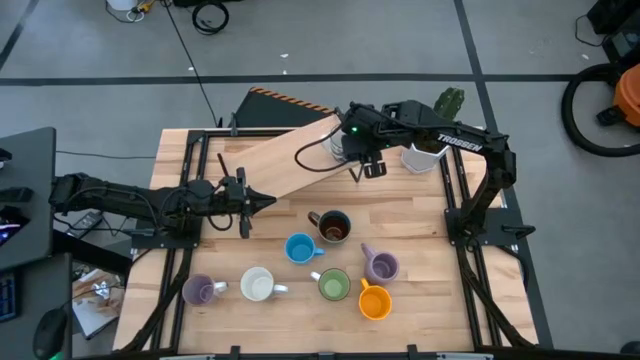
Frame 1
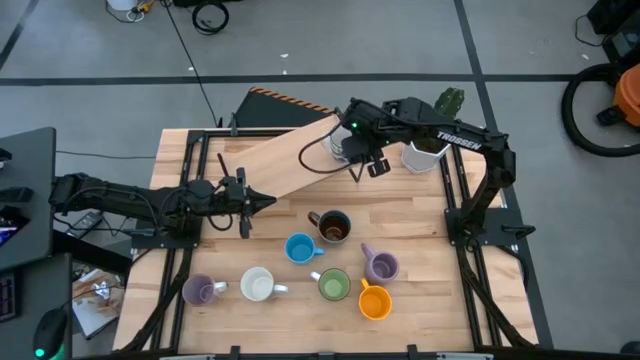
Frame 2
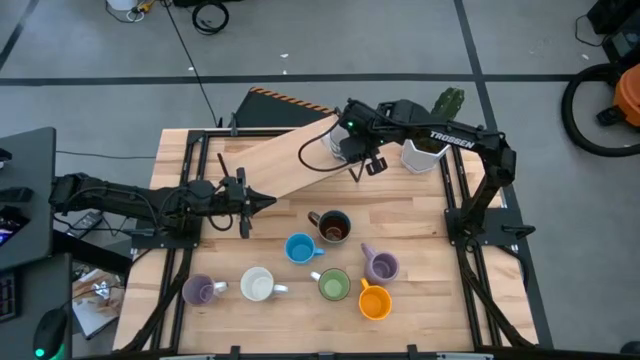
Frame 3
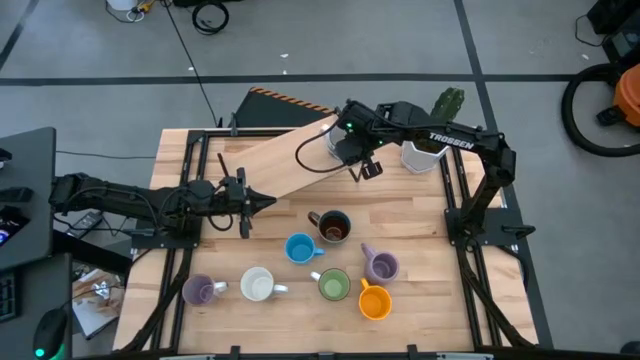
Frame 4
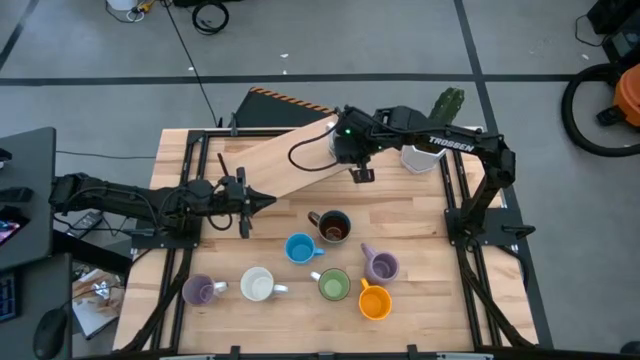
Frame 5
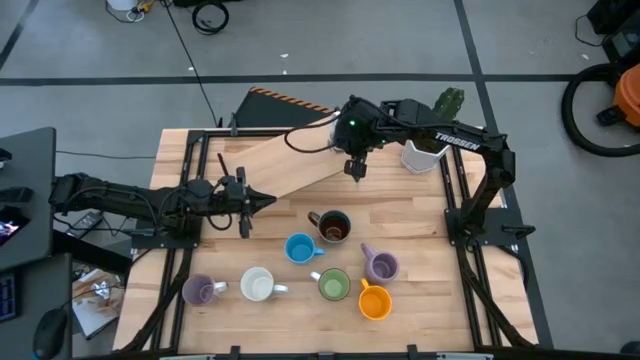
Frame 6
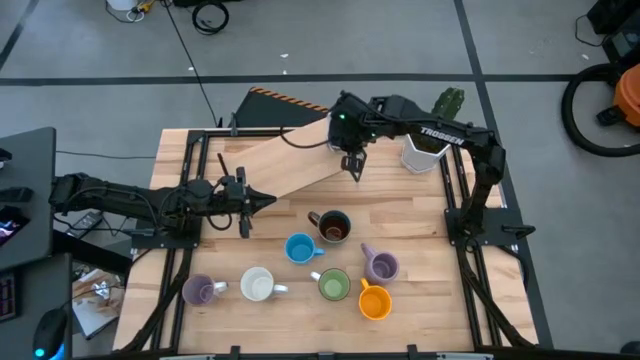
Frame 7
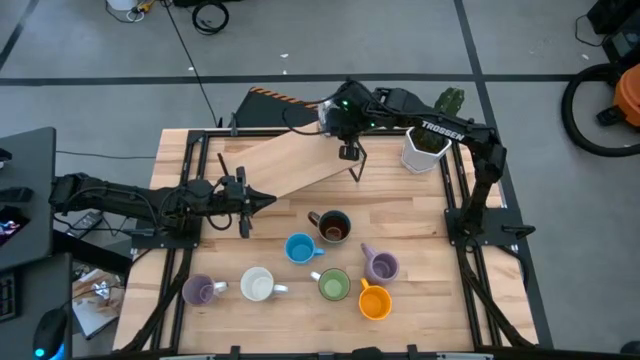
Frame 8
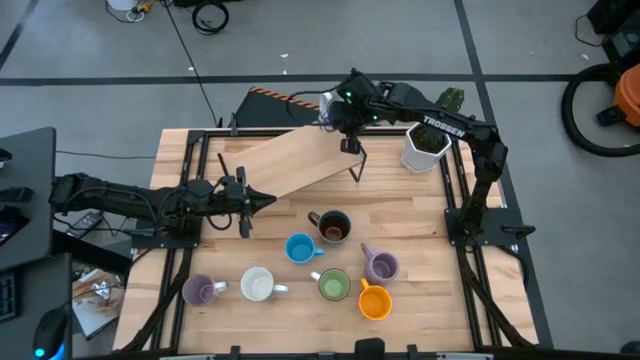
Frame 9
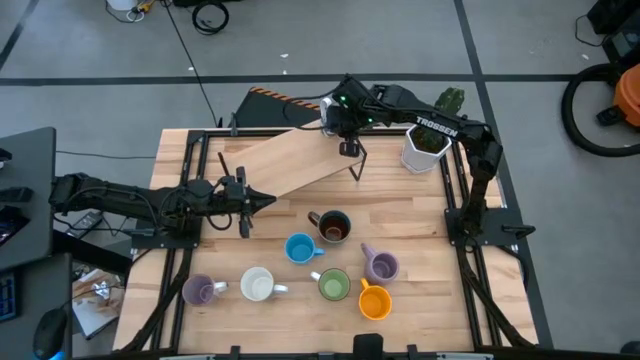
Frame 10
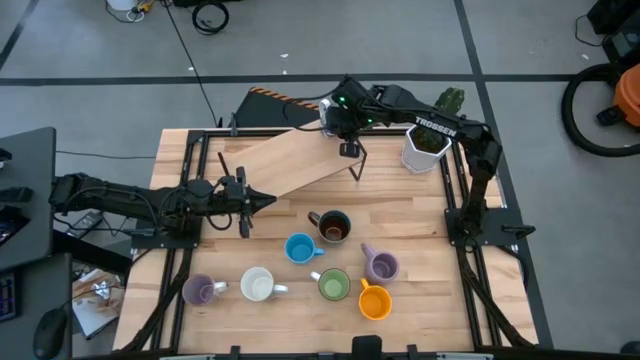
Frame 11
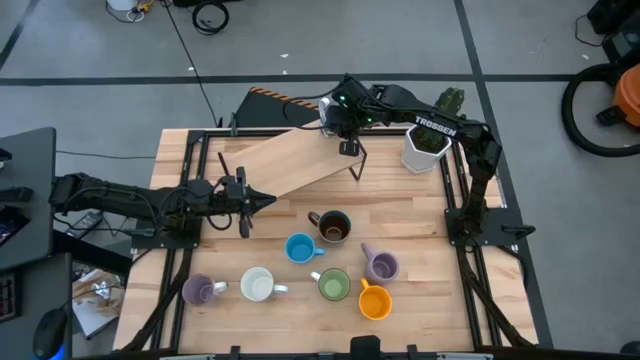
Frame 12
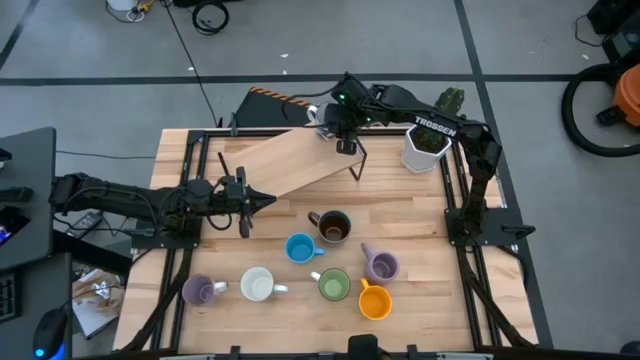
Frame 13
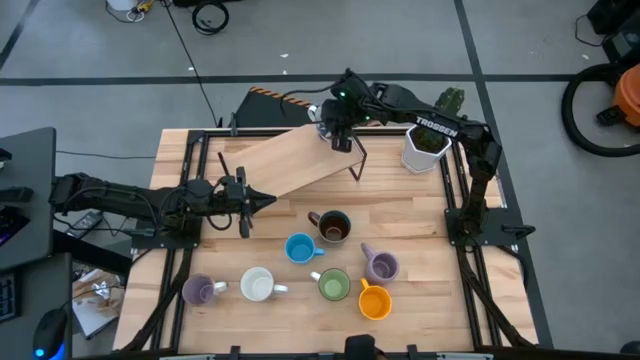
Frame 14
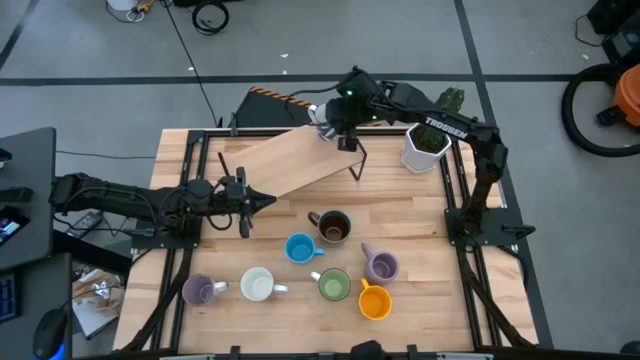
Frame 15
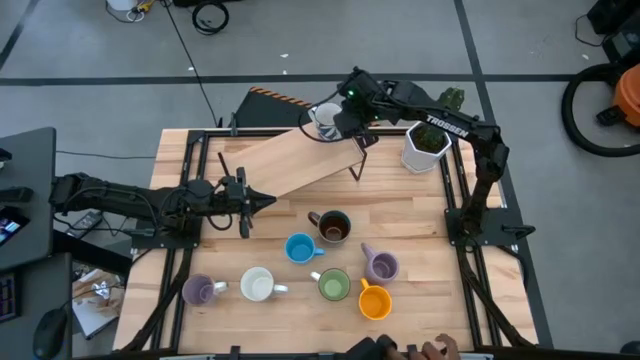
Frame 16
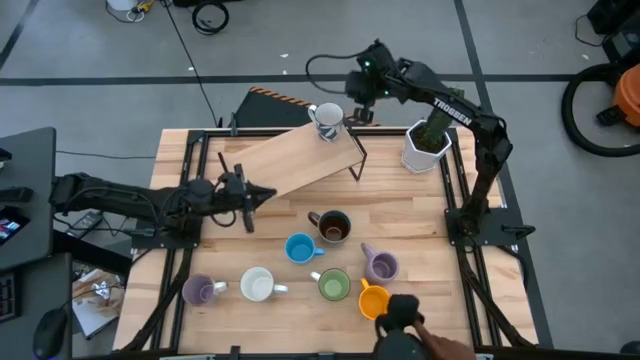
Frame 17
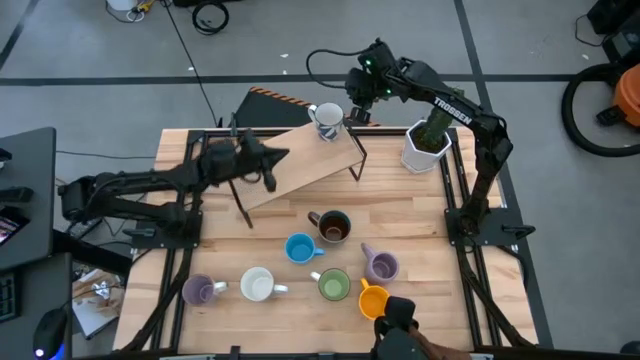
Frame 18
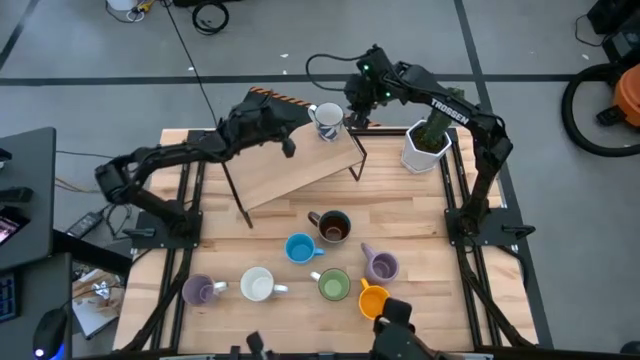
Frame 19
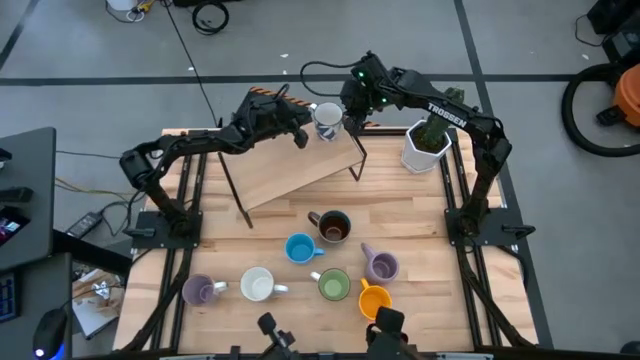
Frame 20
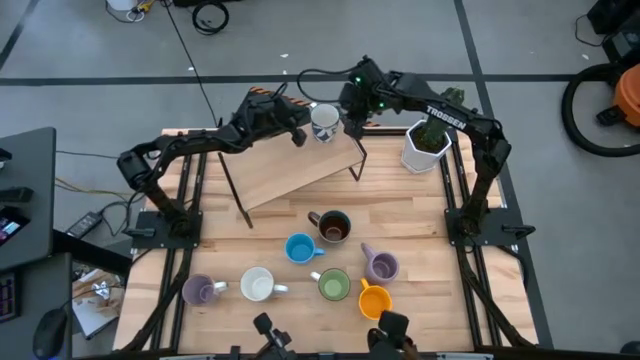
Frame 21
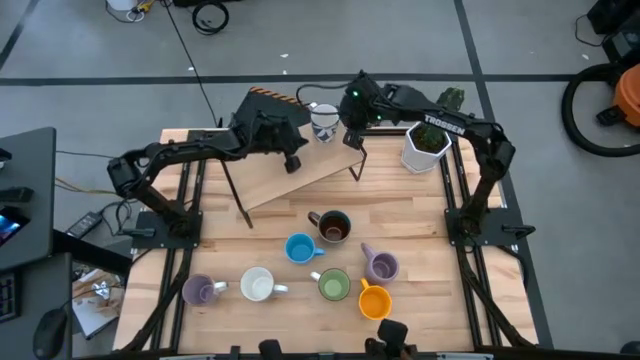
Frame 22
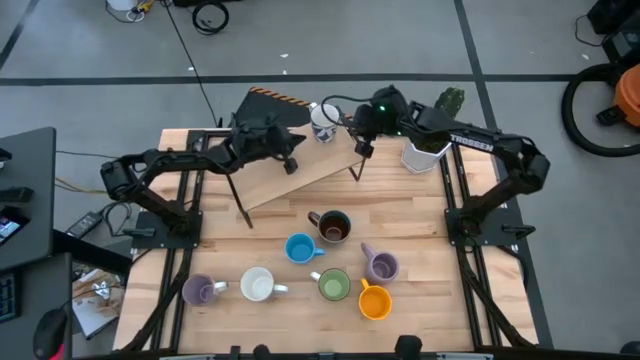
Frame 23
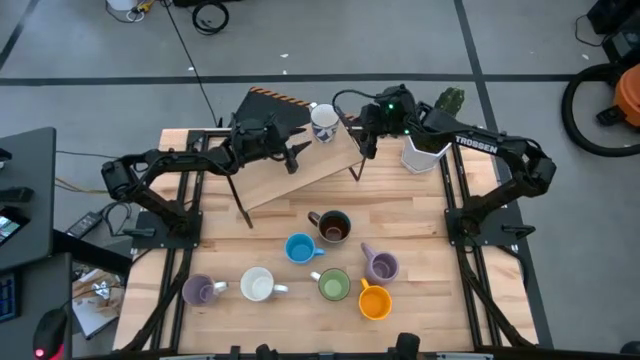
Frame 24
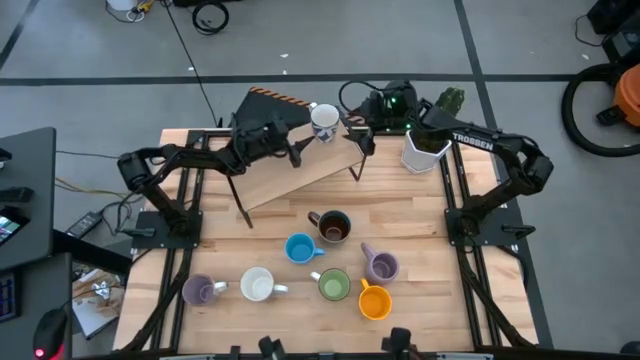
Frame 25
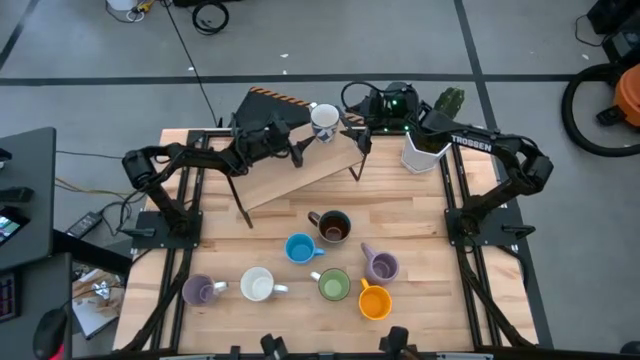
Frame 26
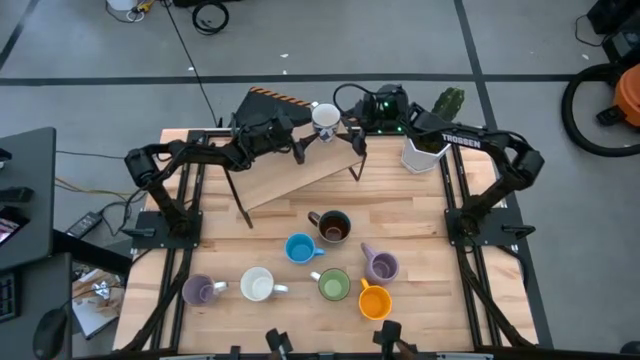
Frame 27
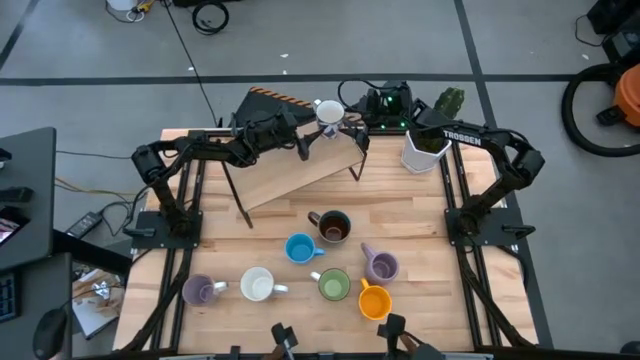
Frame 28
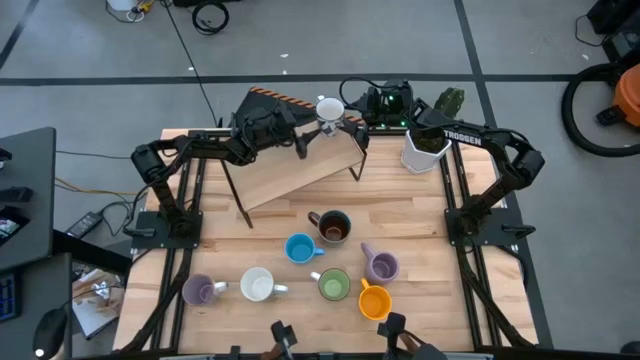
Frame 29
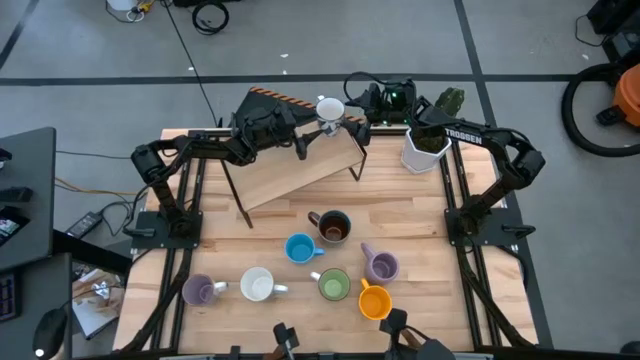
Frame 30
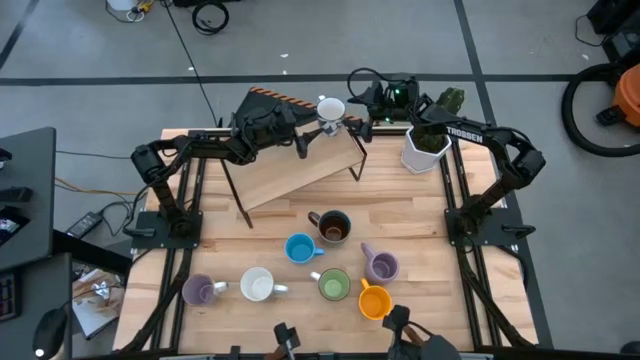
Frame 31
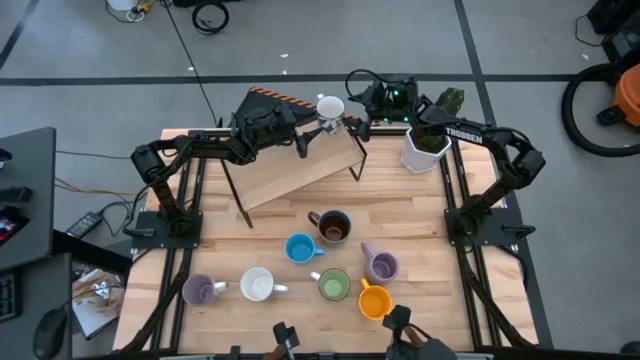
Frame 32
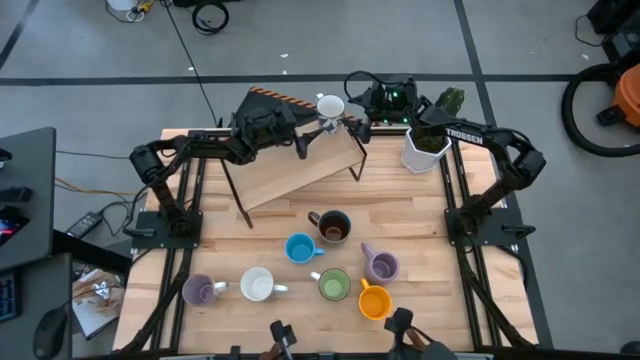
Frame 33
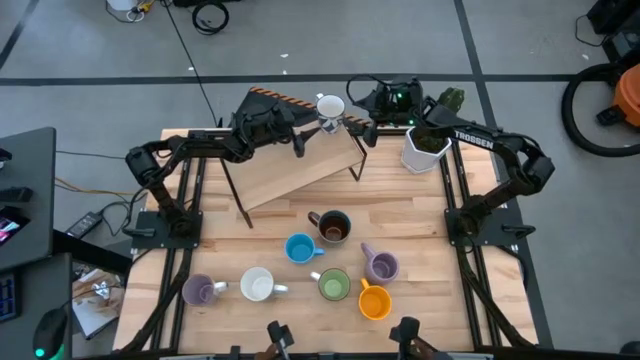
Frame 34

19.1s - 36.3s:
Task: Place coffee mugs
Put the pattern white mug on the shelf

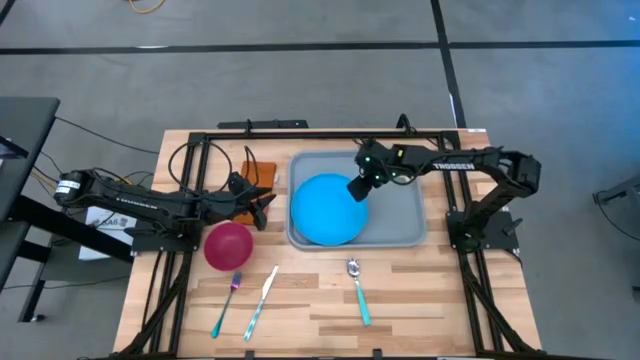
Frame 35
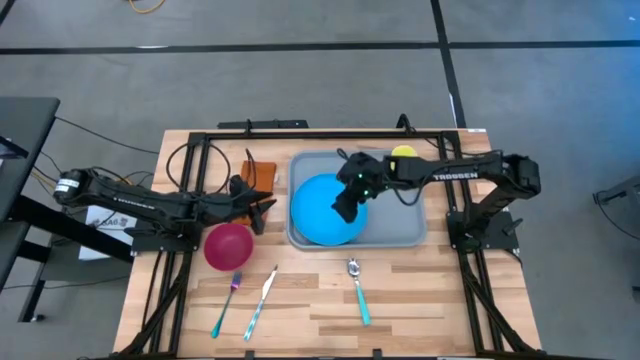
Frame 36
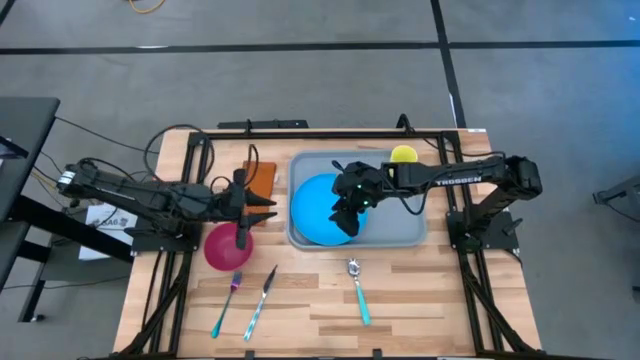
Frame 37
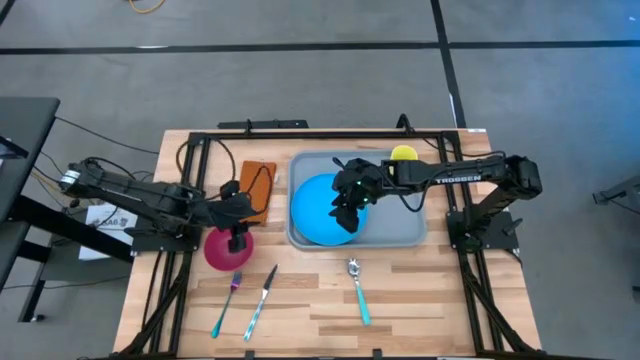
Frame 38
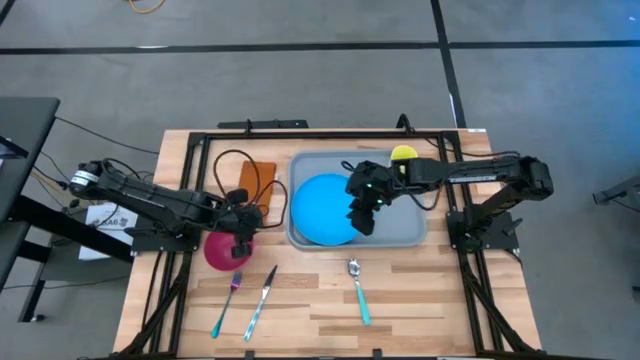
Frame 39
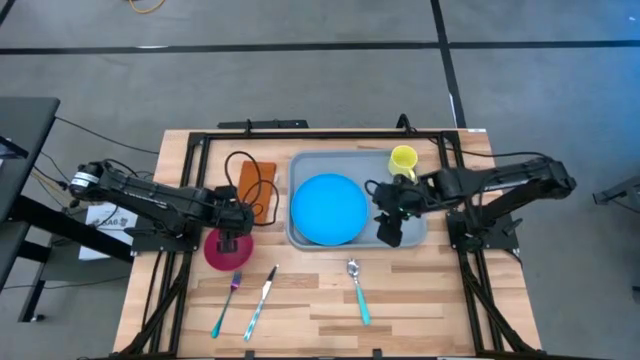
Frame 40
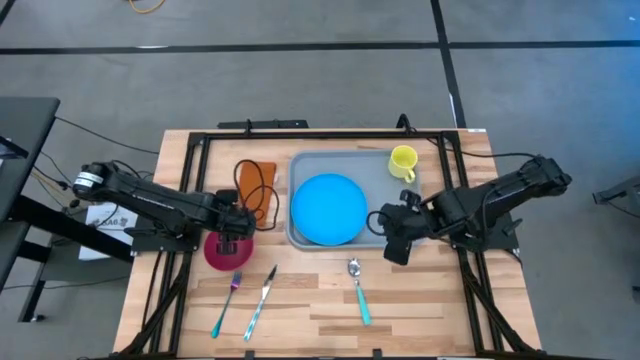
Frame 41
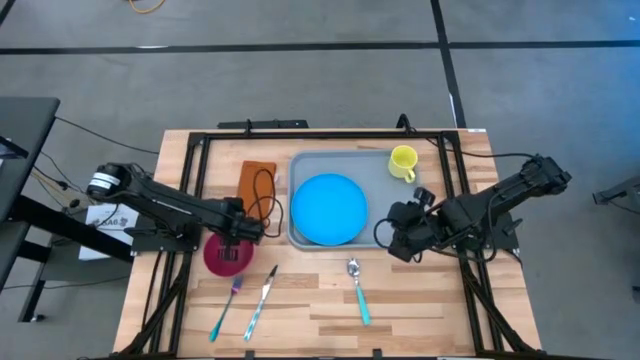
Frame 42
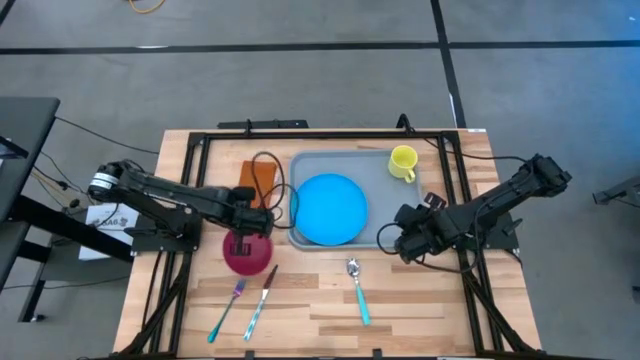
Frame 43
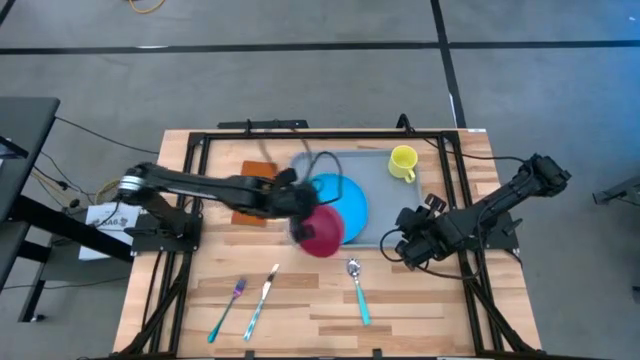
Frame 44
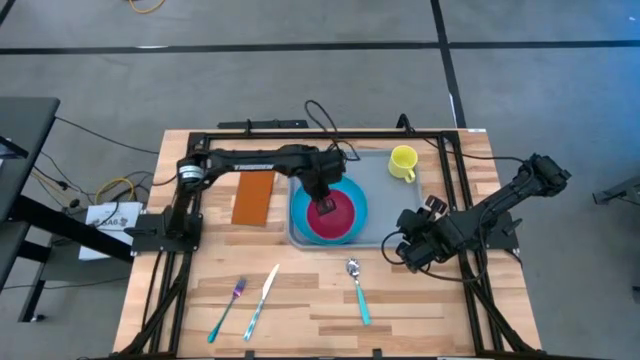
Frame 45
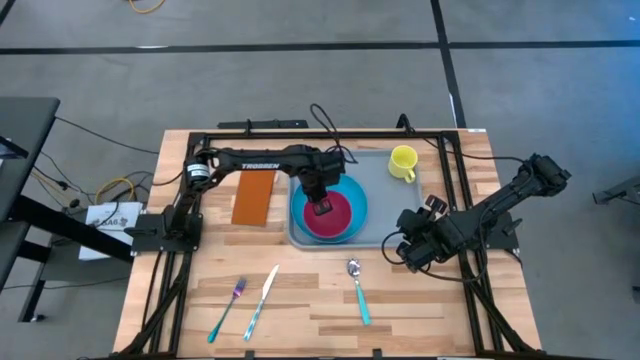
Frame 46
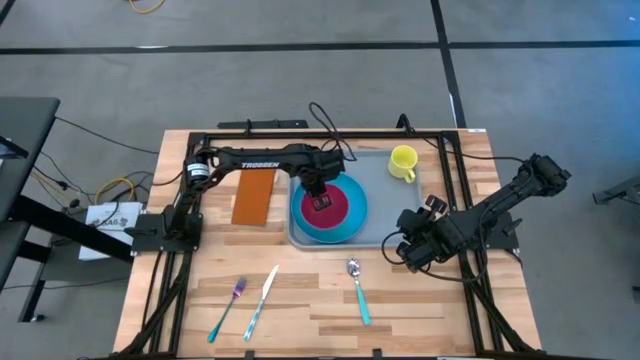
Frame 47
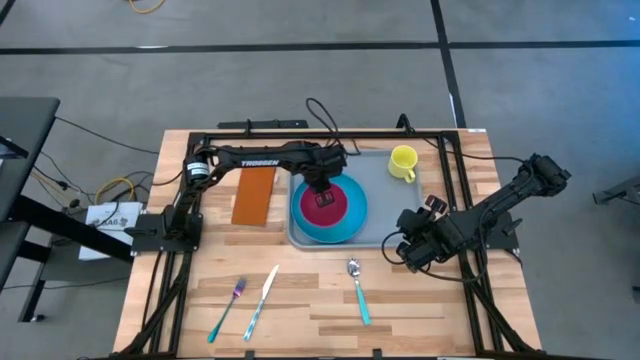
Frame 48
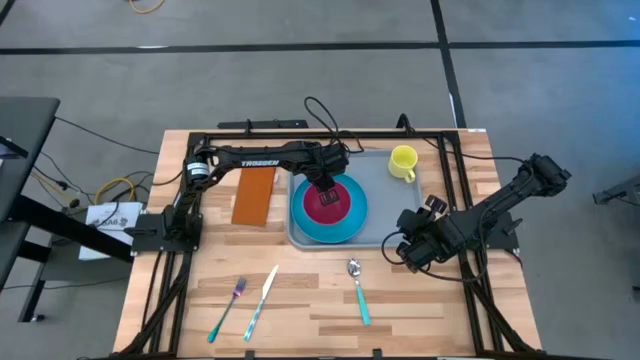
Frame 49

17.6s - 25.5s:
Task: Set up tray
Stack the red bowl on top of the blue plate
